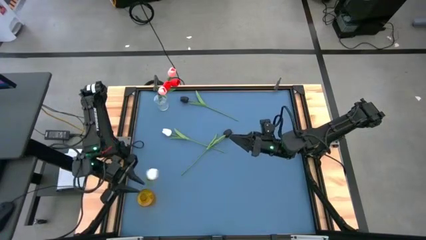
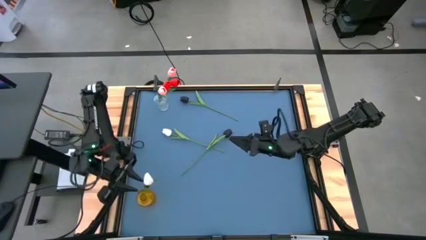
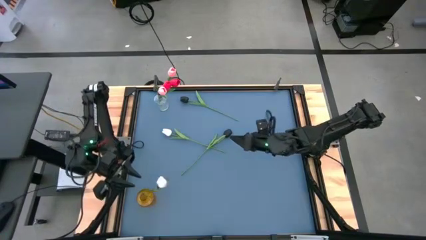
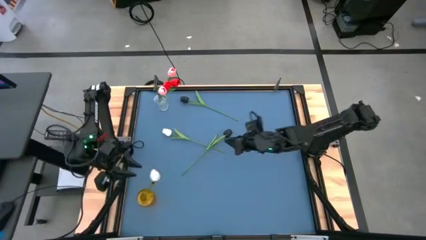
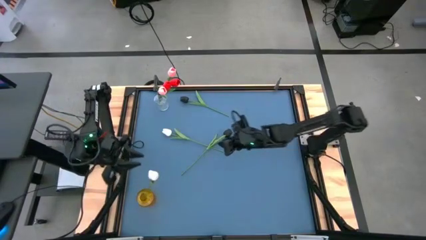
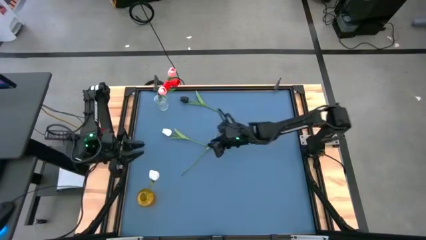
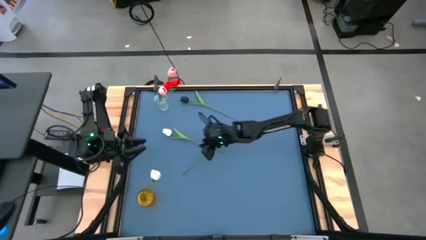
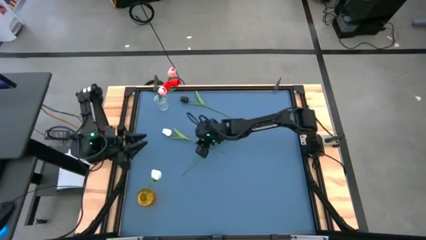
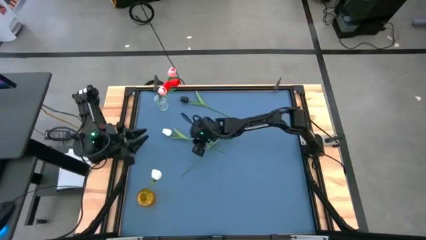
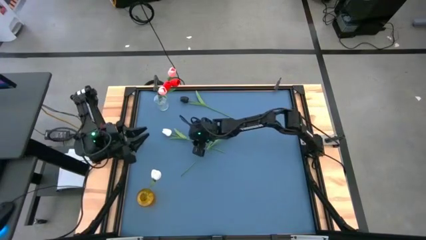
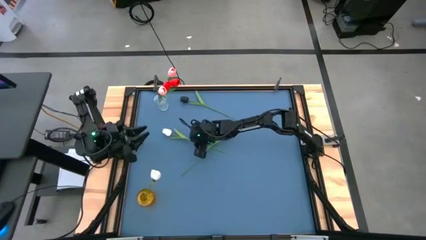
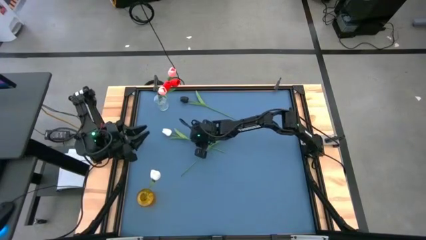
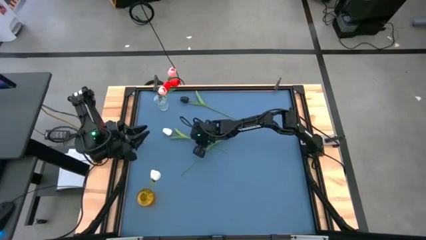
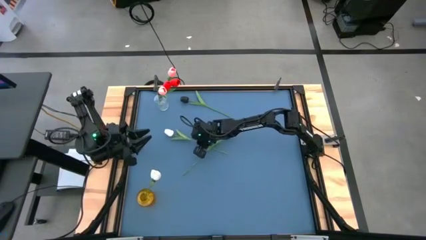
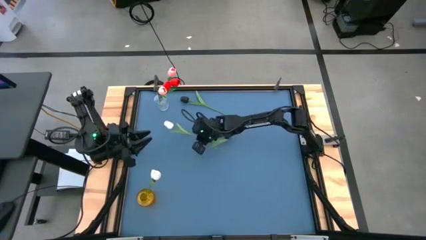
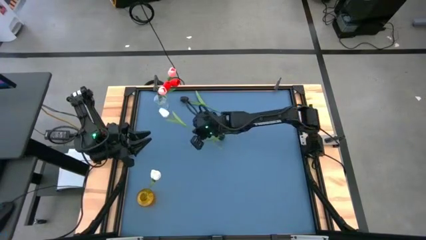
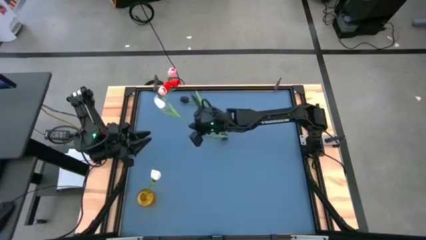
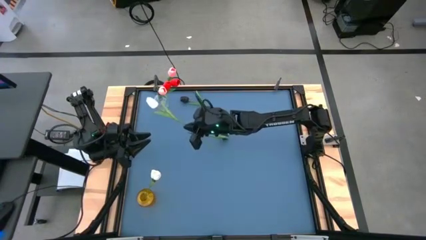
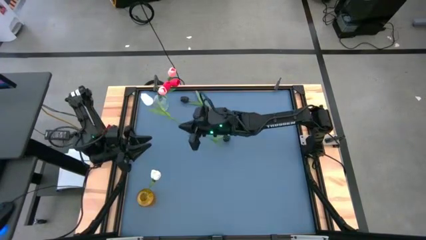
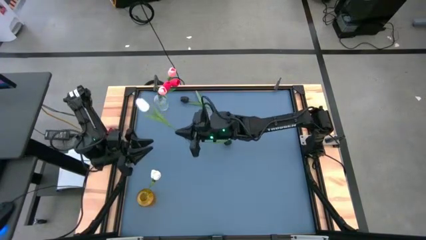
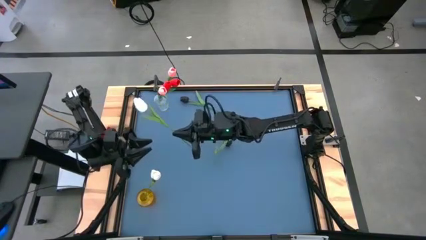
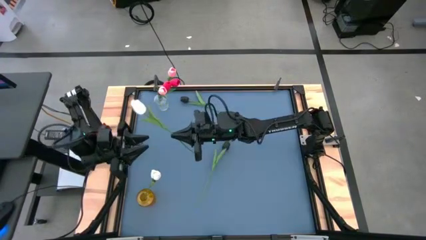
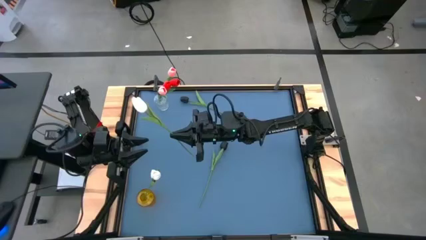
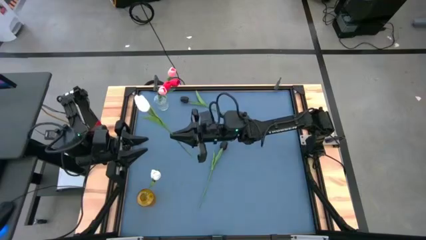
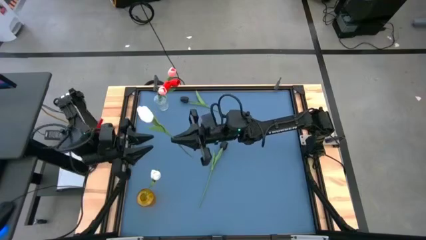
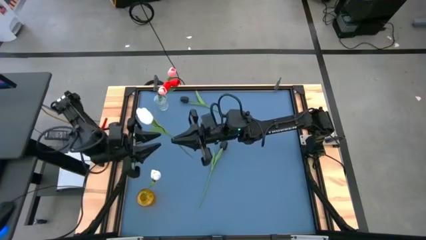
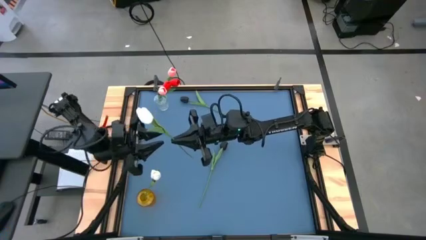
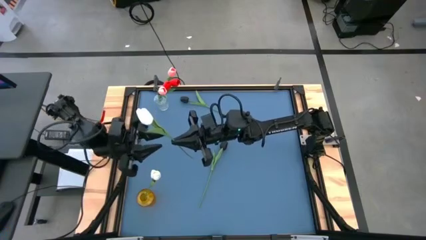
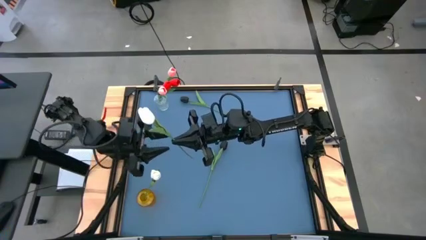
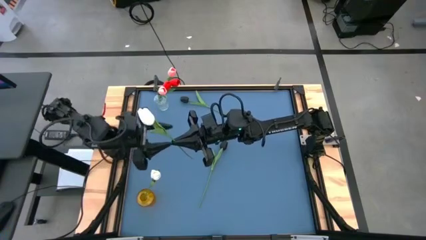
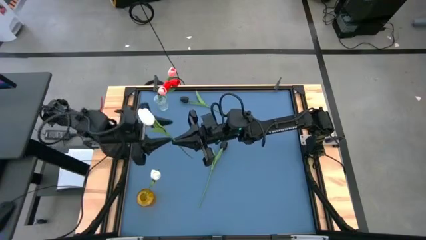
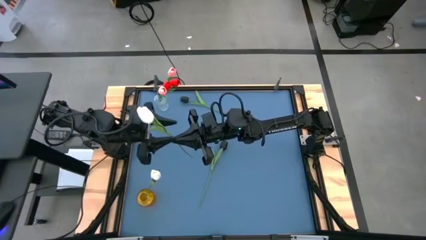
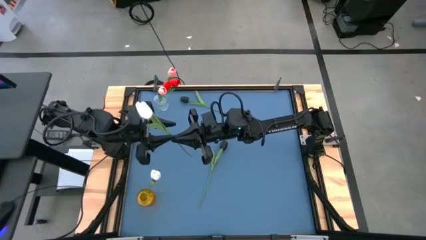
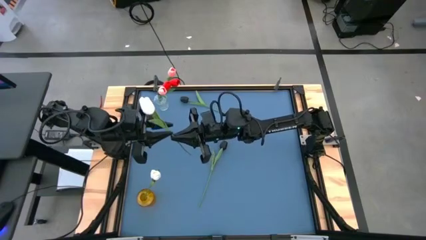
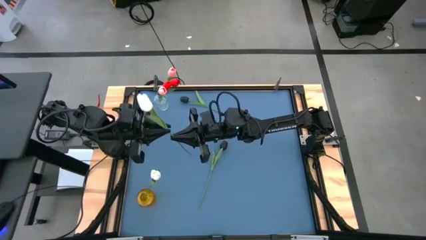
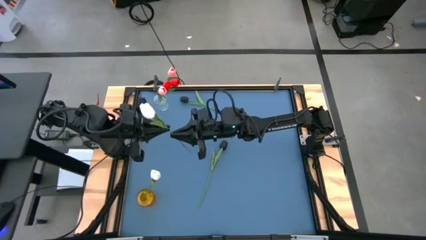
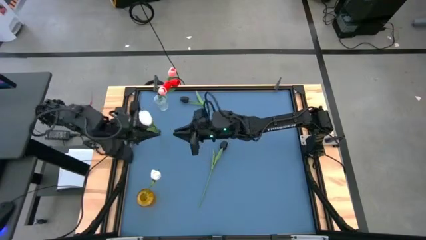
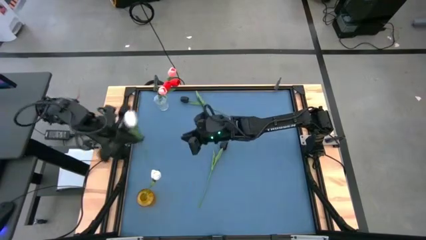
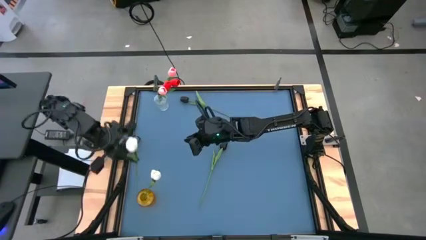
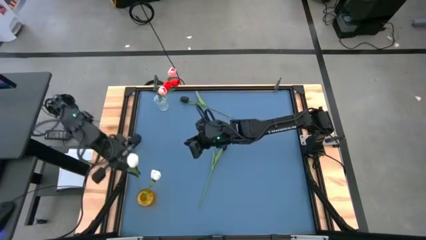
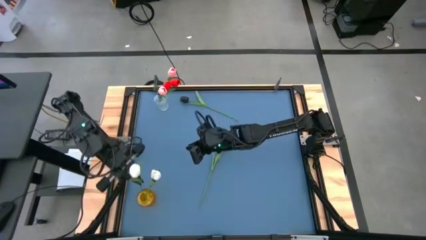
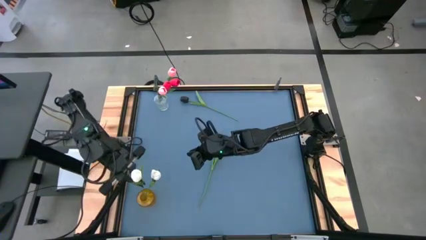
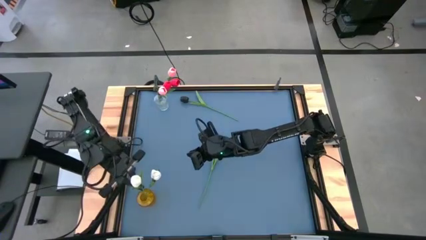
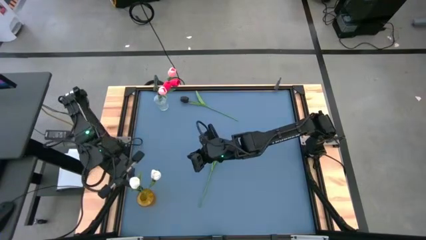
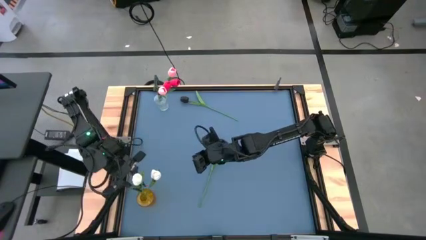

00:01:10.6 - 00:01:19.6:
Task: Sort flowers into vase by color
Put the white flower into the yellow vase

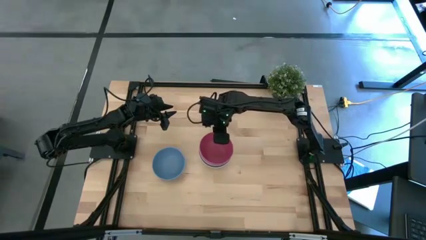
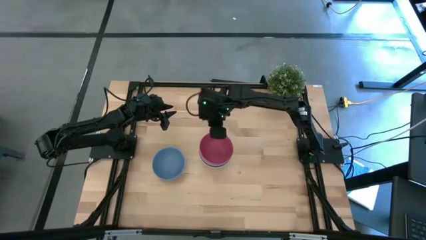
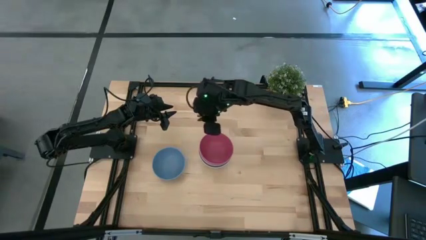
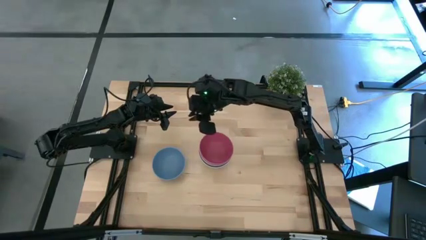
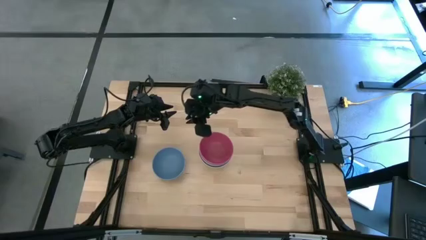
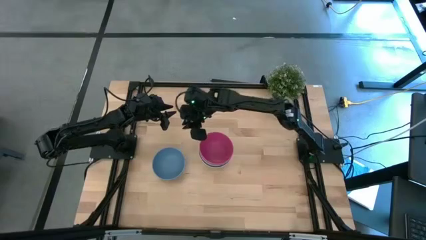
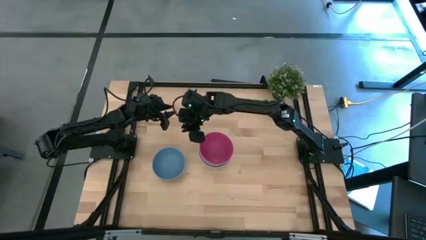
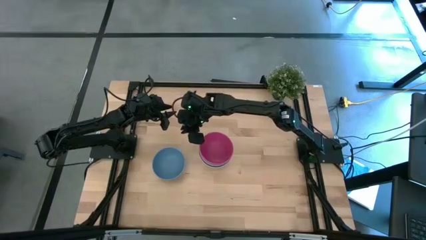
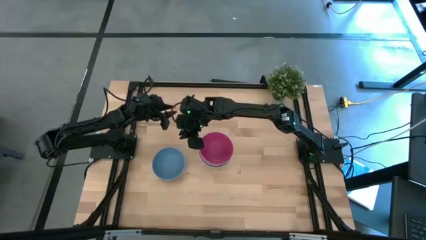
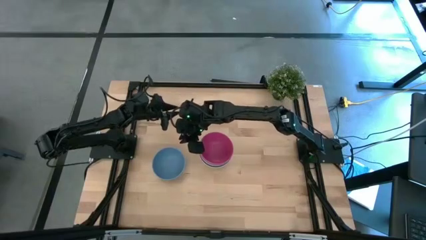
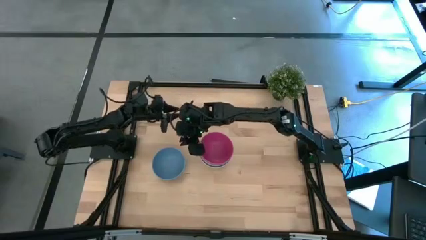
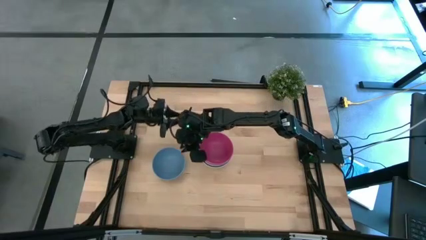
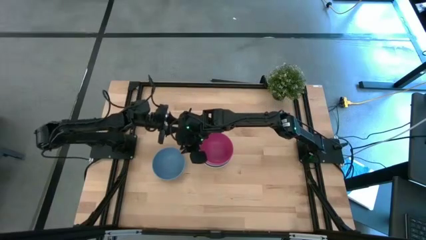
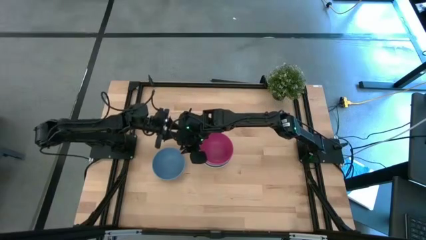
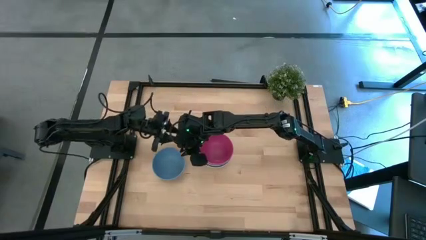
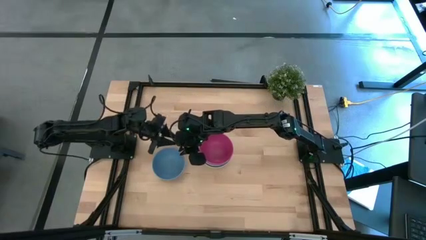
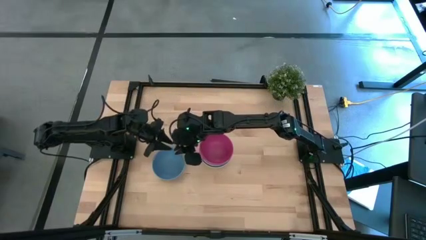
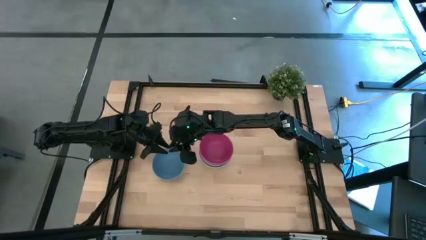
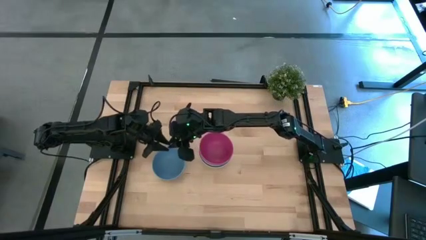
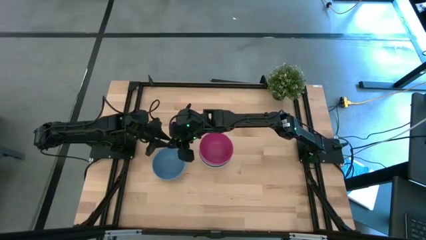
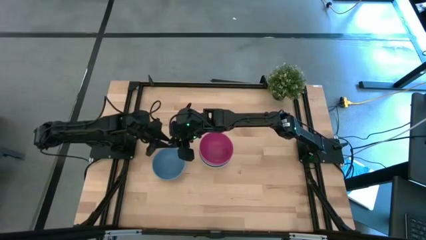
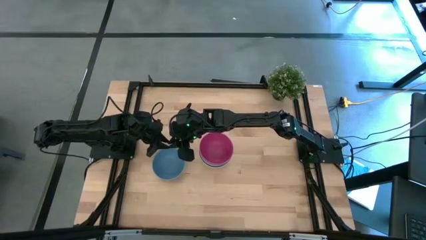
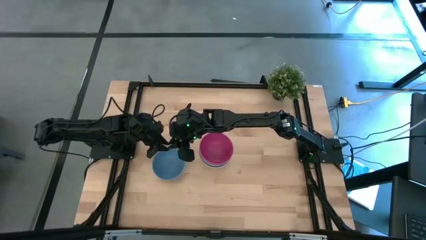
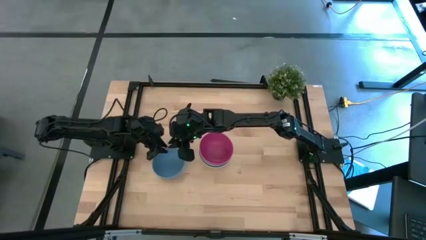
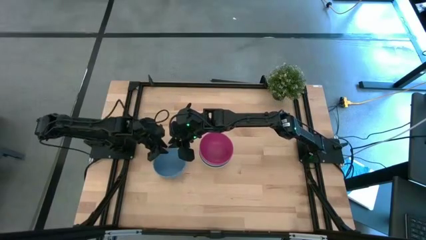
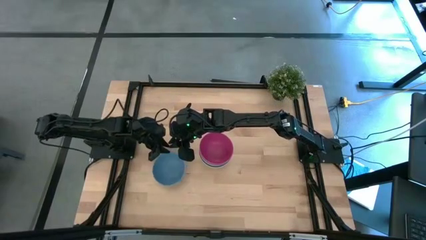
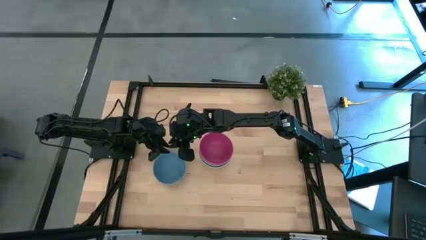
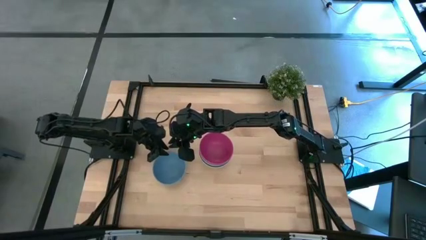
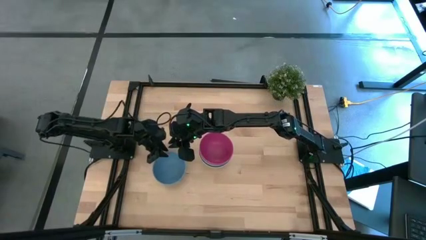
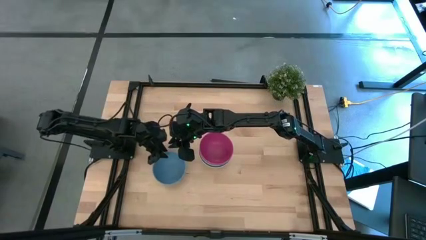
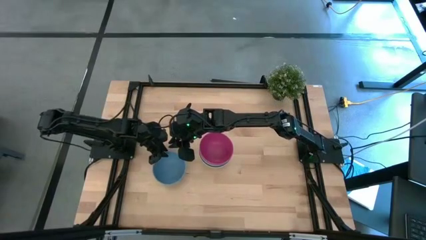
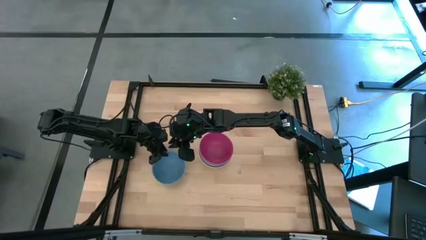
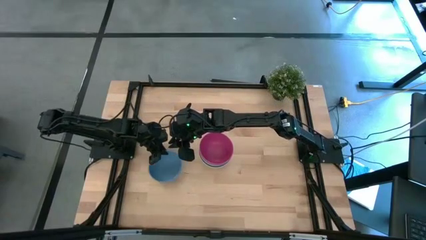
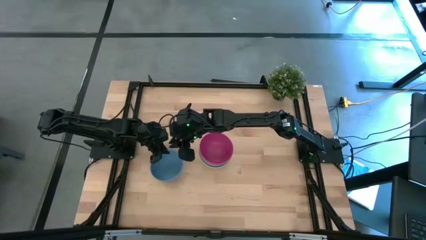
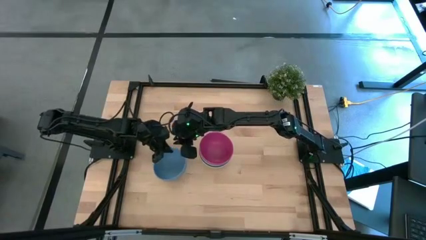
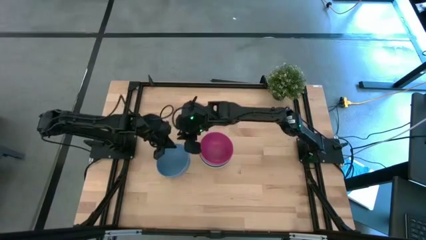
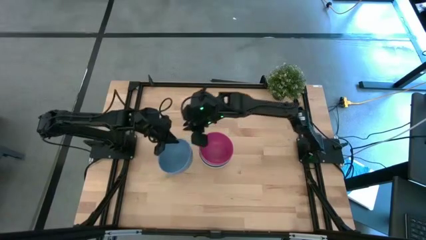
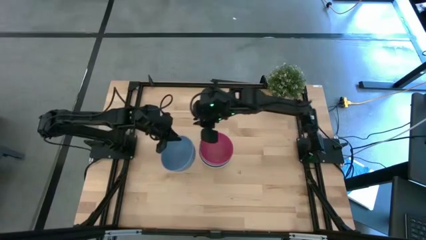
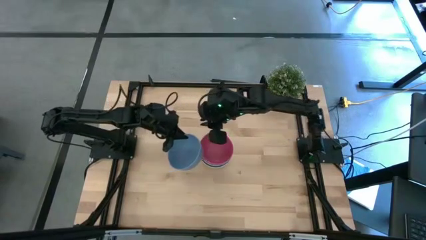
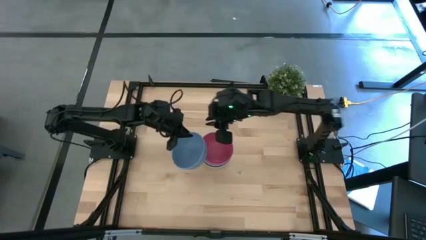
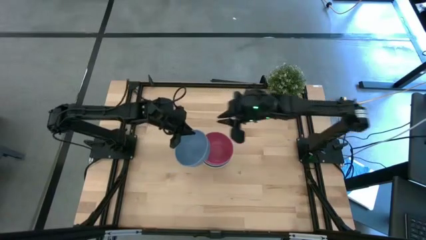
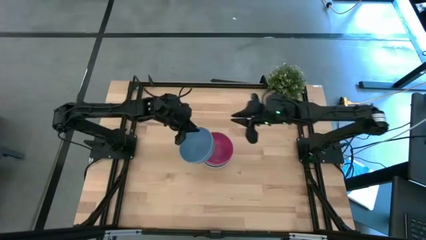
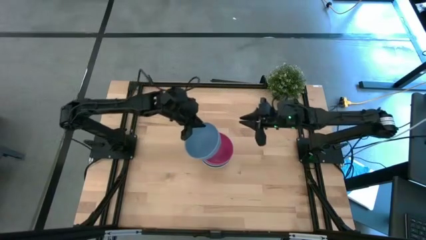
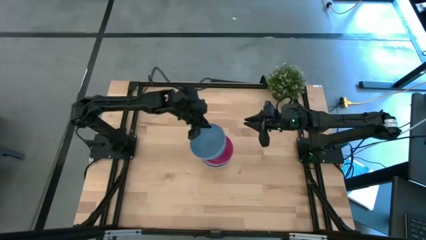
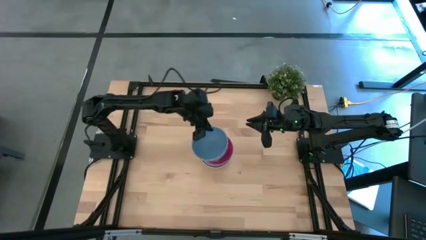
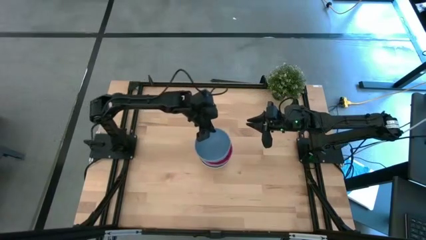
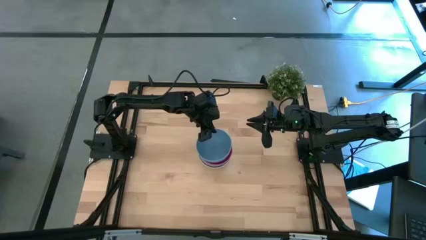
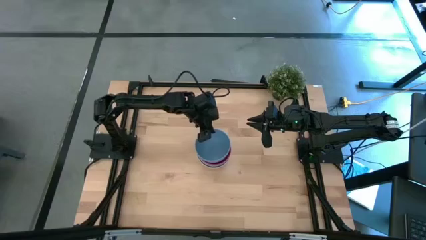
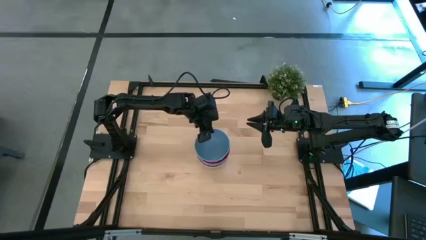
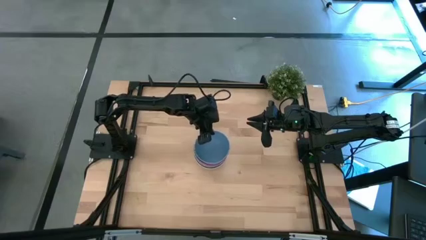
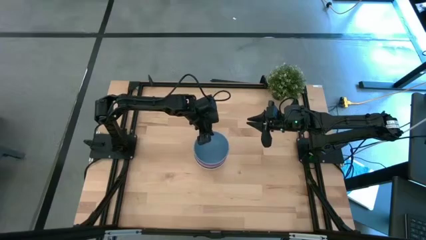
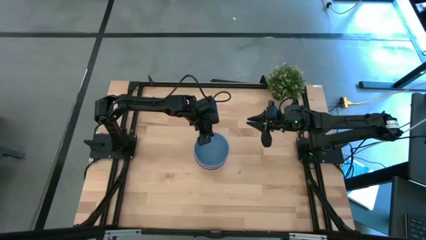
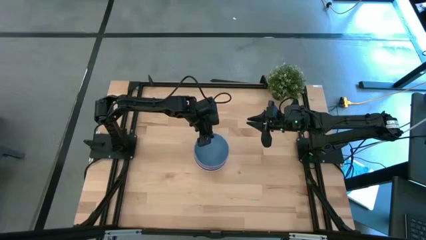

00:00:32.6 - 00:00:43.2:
Task: Nest bowls inside each other
Stack the blue bowl on top of the pink bowl
